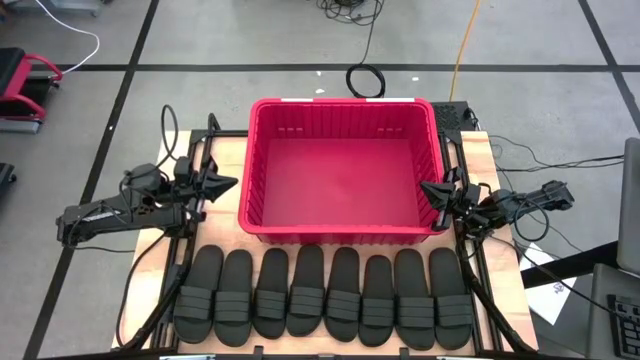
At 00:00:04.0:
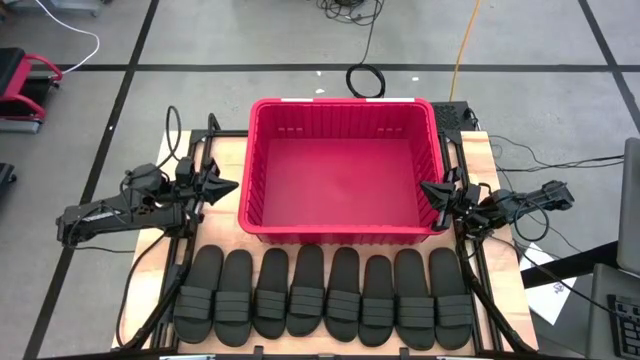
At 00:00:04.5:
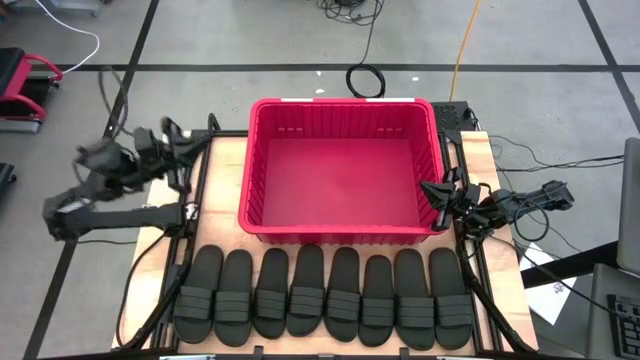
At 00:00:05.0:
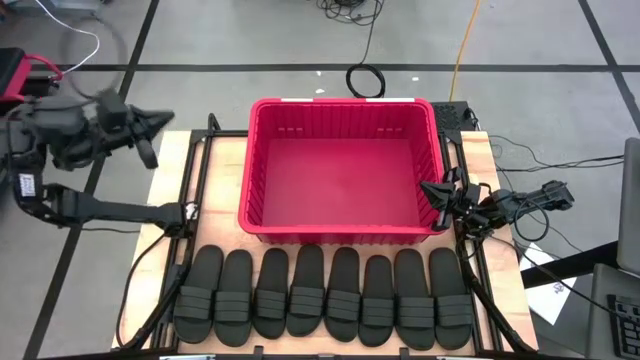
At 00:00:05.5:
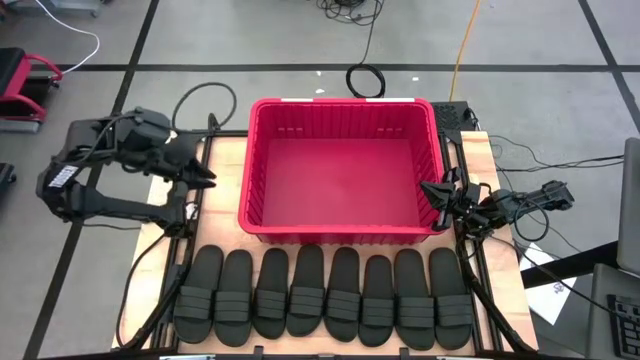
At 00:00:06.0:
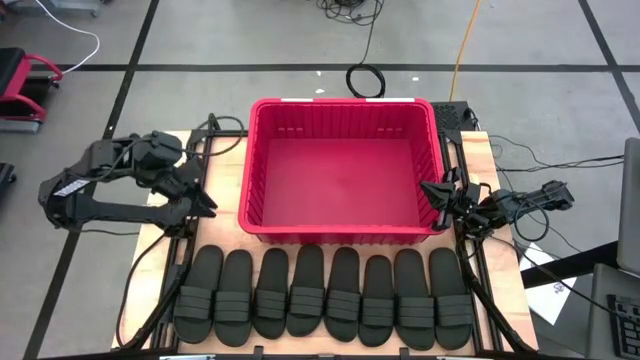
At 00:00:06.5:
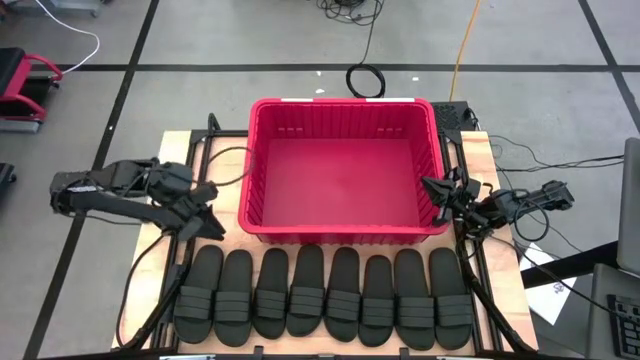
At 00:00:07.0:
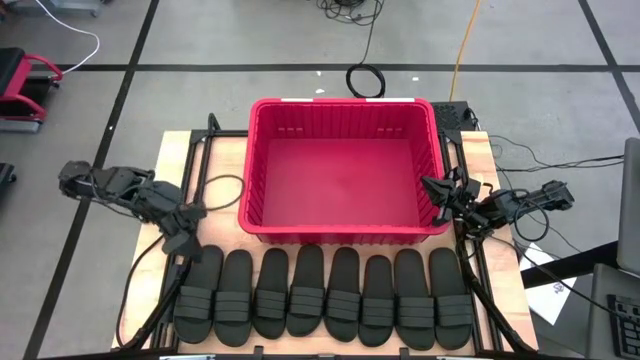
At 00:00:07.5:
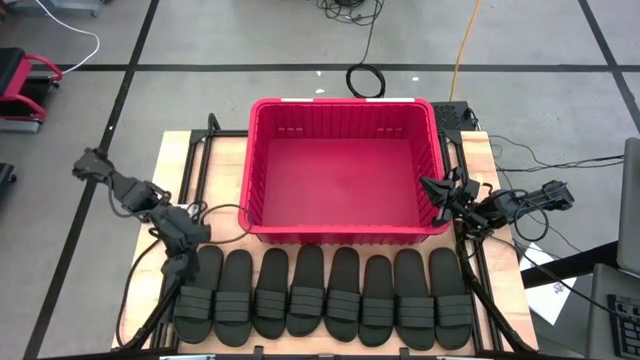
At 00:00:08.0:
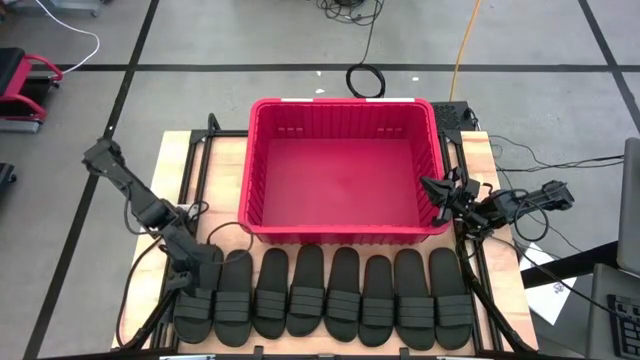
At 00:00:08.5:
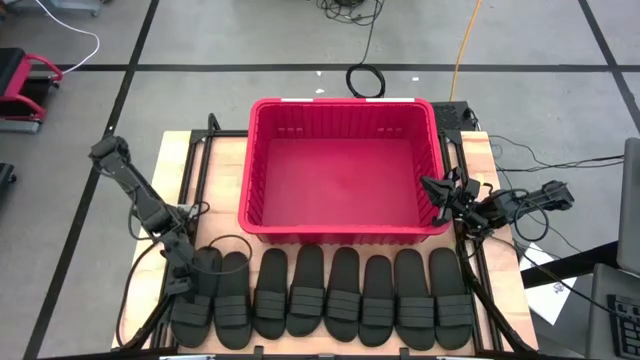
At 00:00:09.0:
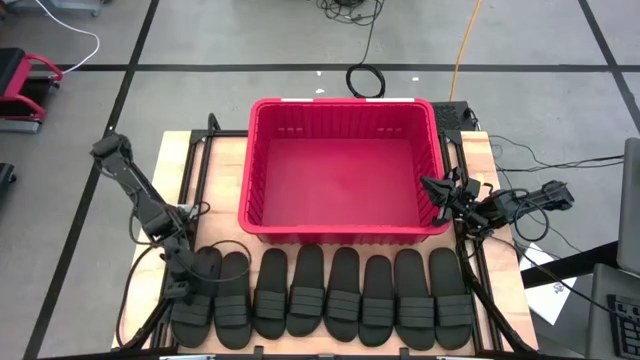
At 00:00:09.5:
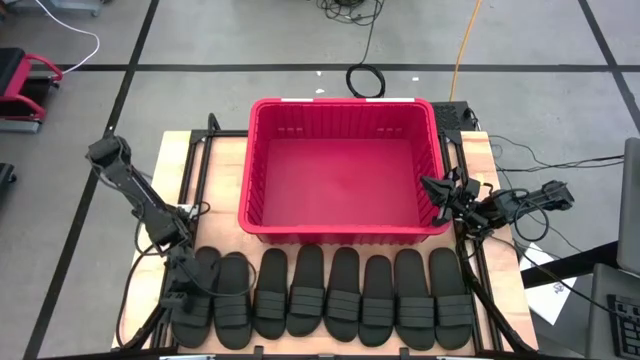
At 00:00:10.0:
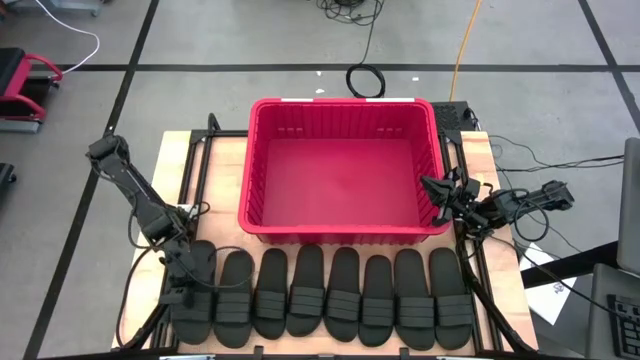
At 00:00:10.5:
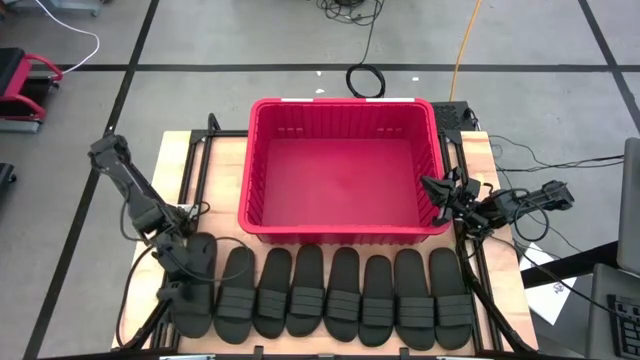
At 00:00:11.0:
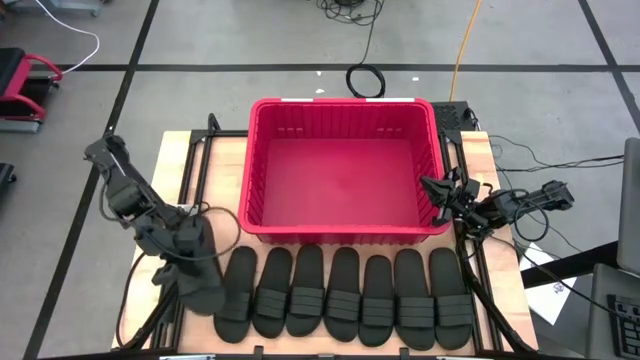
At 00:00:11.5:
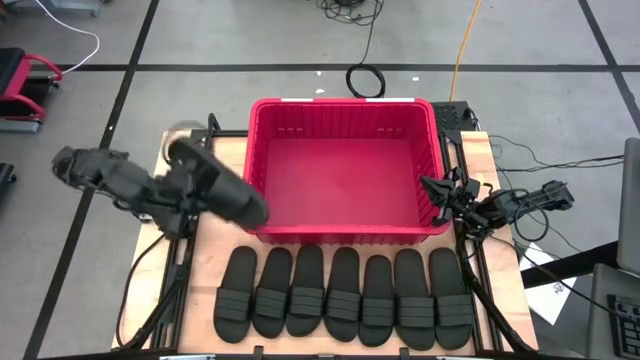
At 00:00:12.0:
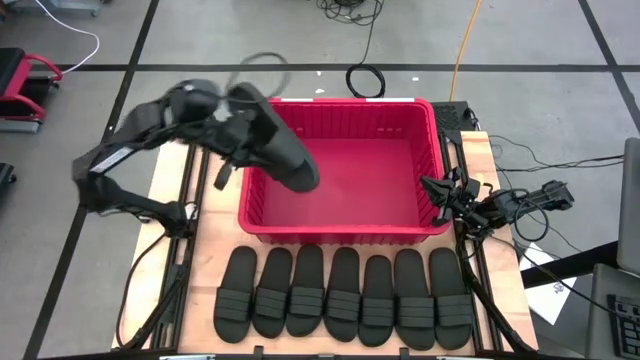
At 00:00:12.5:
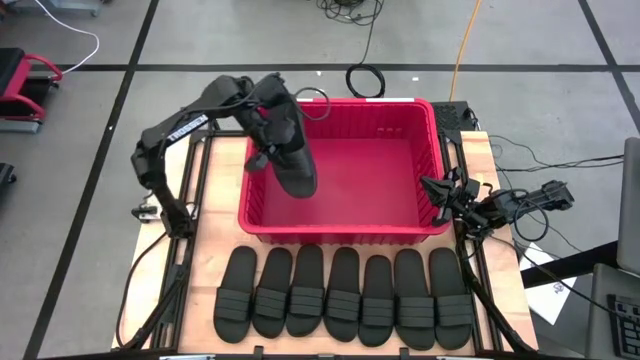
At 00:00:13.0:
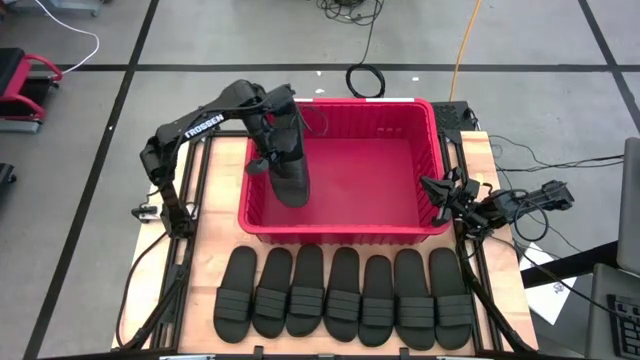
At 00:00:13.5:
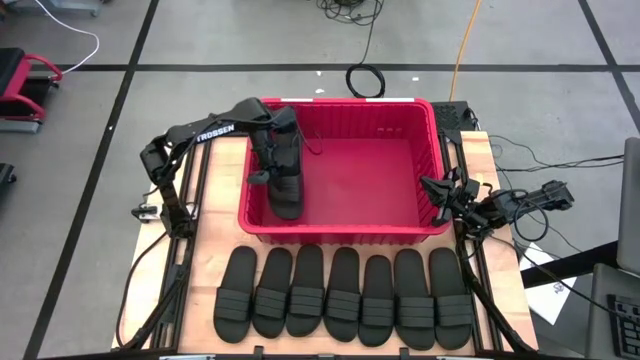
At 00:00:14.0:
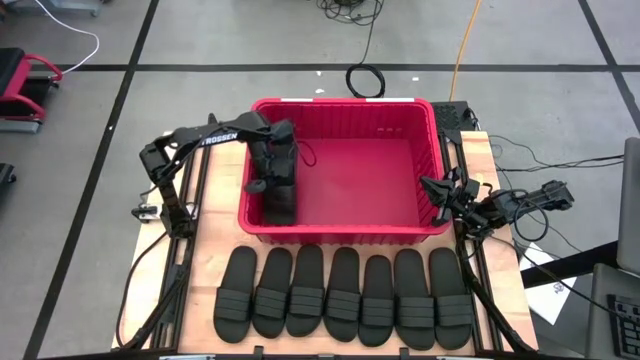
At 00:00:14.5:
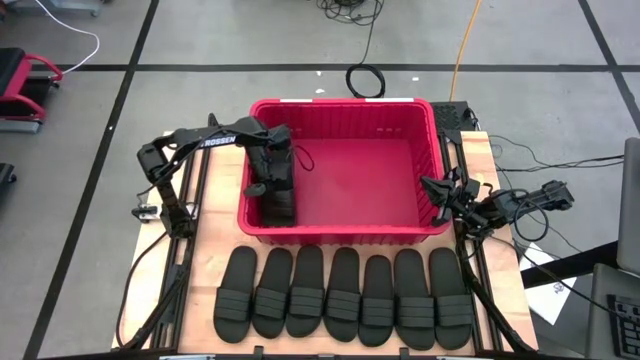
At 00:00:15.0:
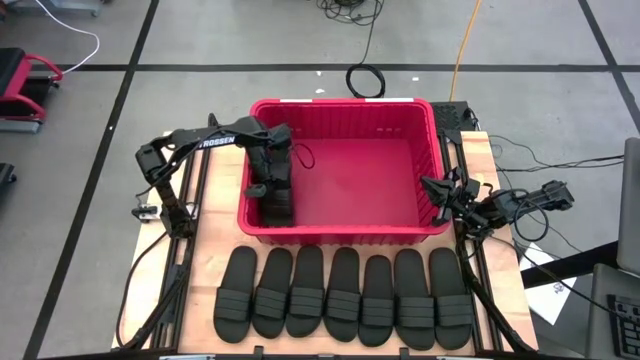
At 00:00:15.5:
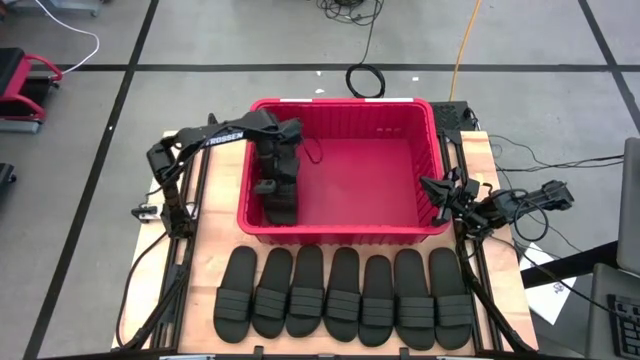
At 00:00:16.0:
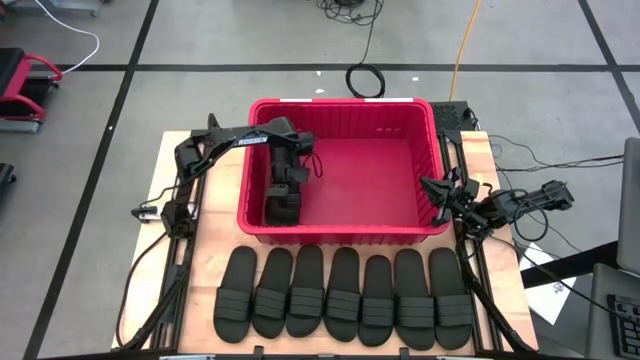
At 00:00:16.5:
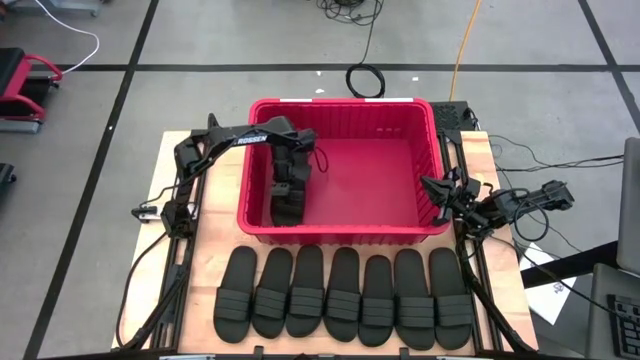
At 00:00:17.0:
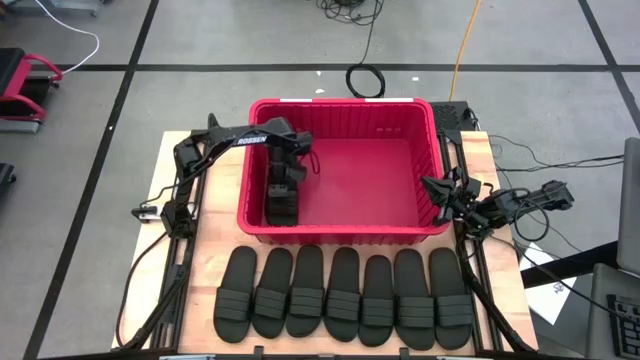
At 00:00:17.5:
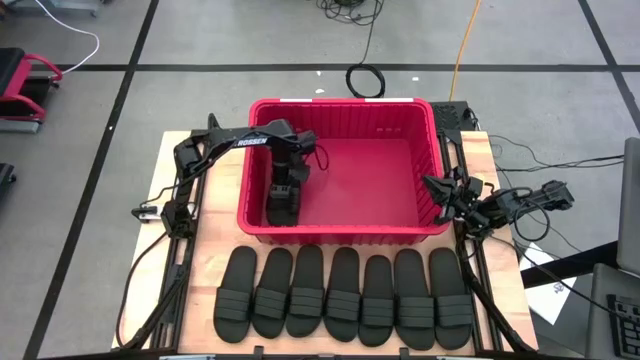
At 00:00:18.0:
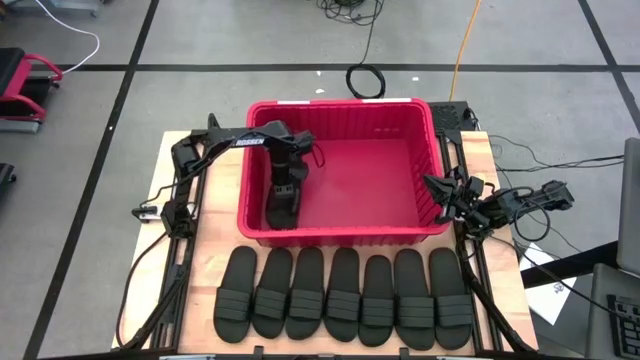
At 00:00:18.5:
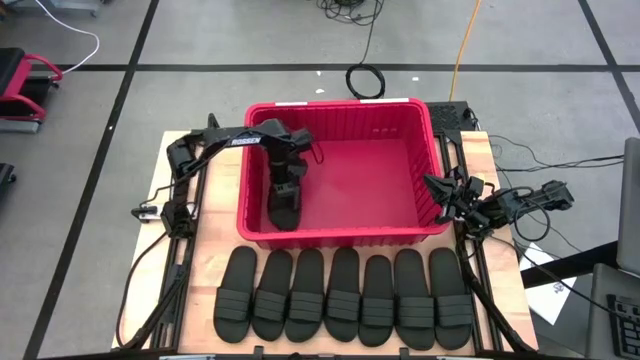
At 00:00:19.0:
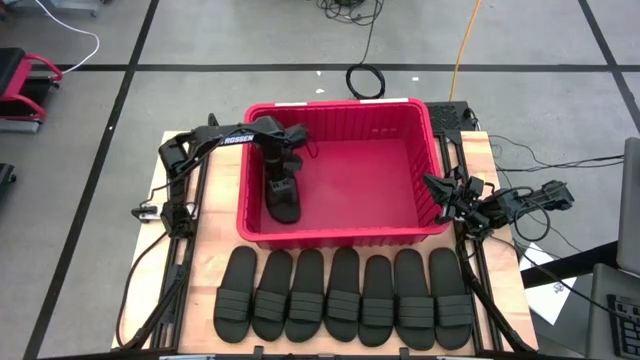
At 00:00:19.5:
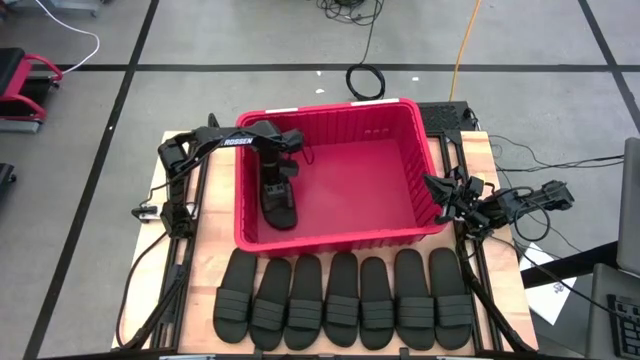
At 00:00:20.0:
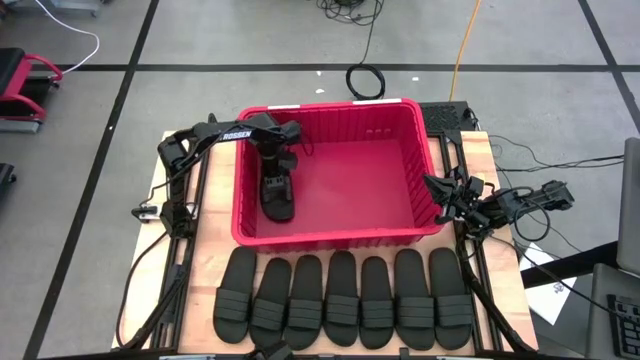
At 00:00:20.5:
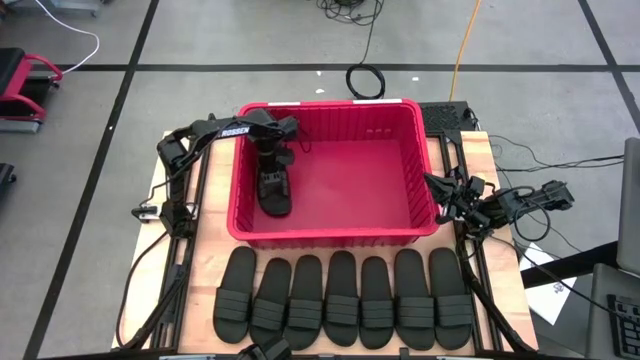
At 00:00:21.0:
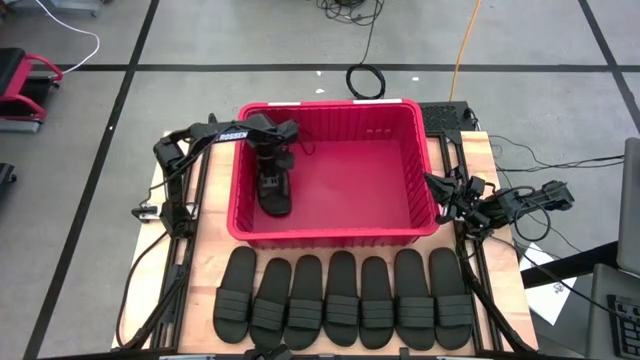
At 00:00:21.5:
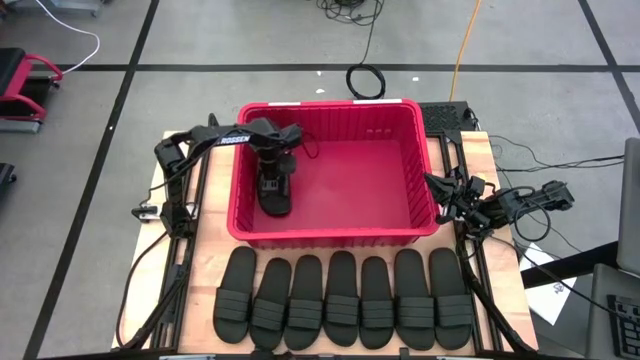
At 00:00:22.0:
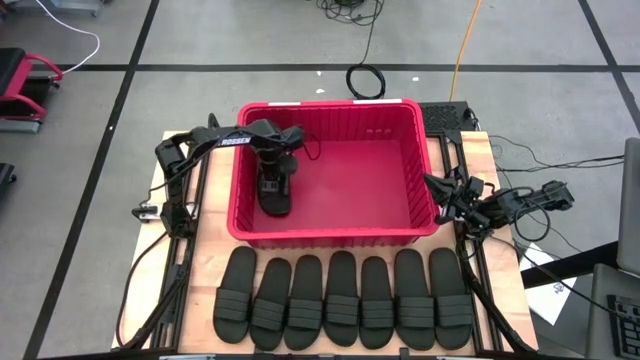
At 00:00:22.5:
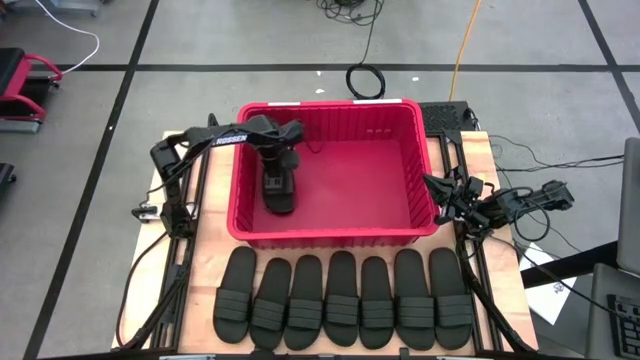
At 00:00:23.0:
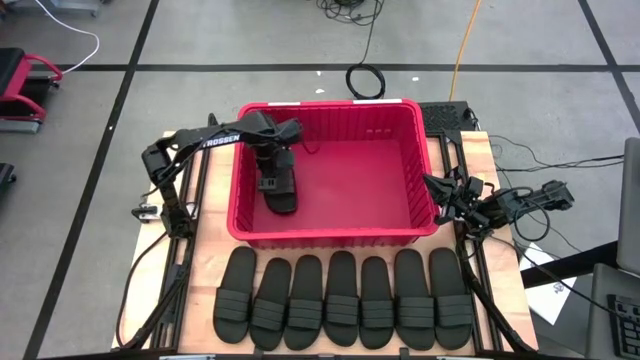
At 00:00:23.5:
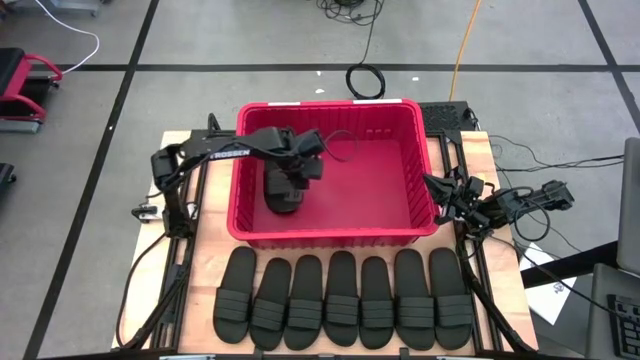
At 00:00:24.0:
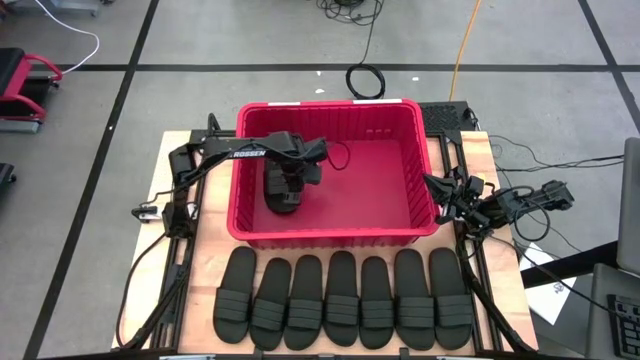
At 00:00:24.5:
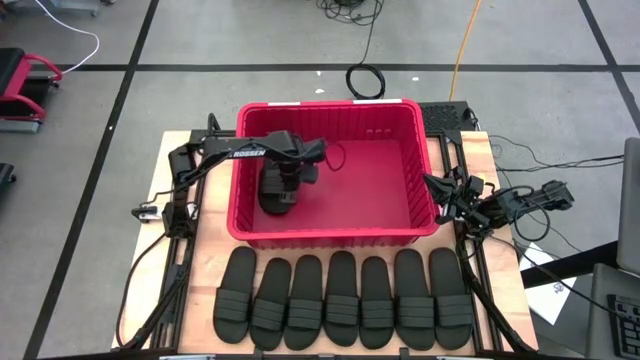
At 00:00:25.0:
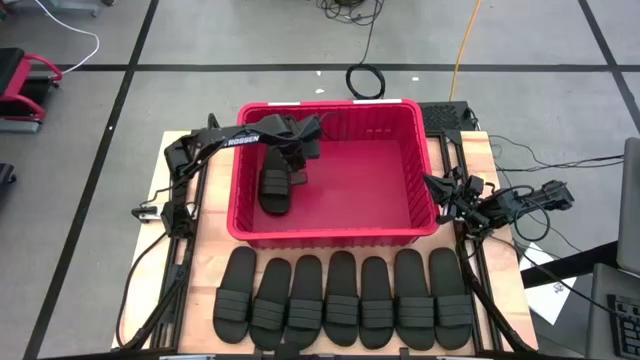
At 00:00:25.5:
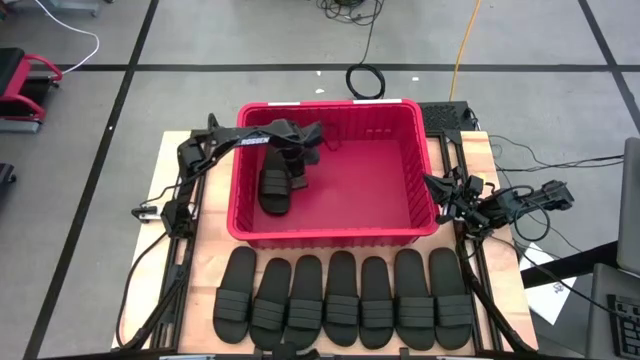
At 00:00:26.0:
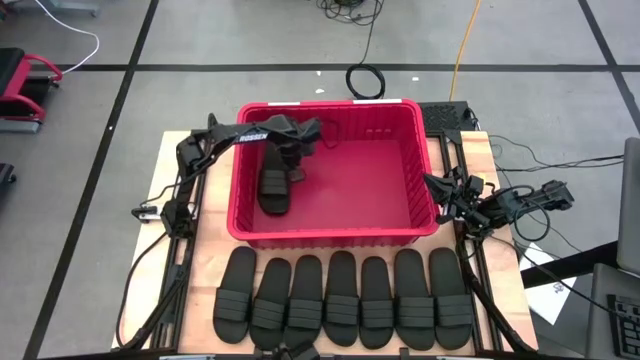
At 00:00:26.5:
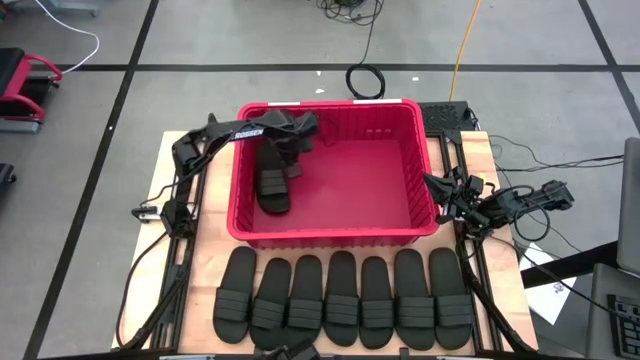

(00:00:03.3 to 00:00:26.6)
Task: Pick and place slides into bin
Put the slipper into the bin
